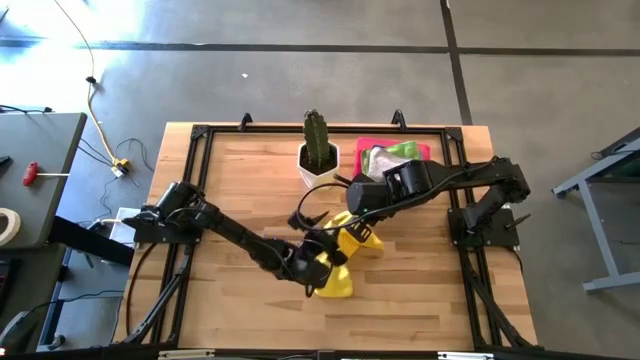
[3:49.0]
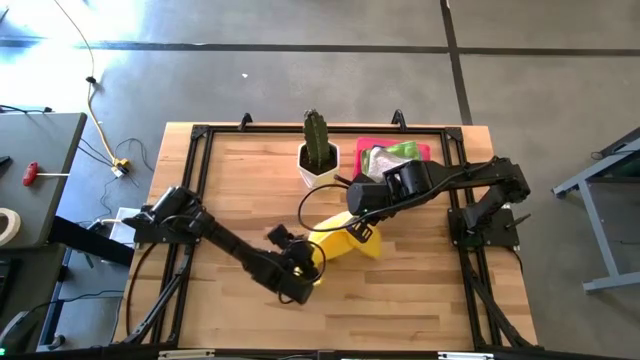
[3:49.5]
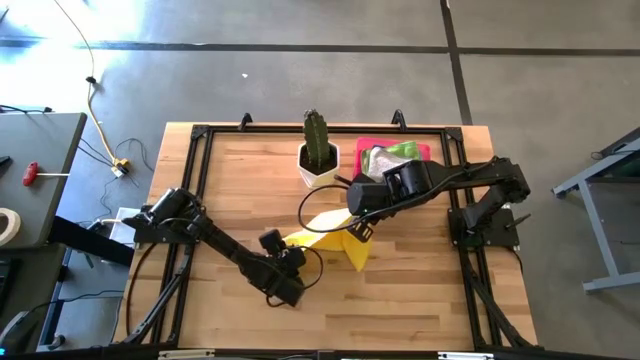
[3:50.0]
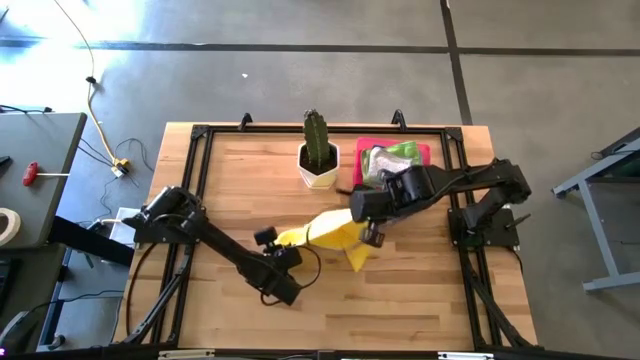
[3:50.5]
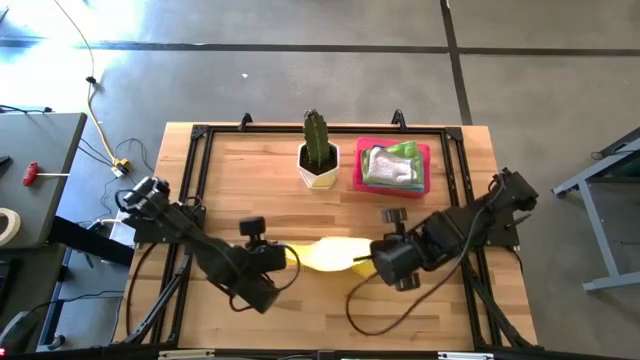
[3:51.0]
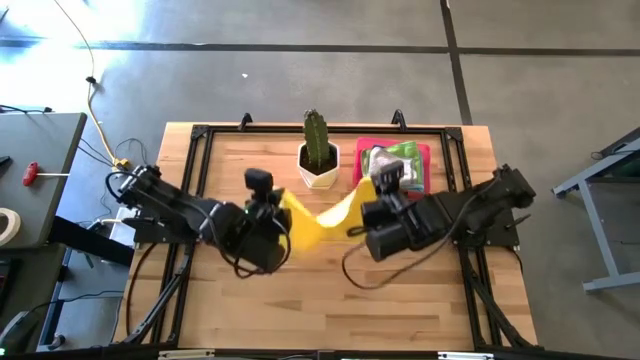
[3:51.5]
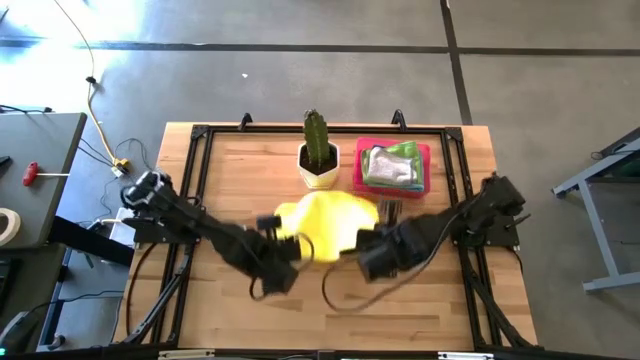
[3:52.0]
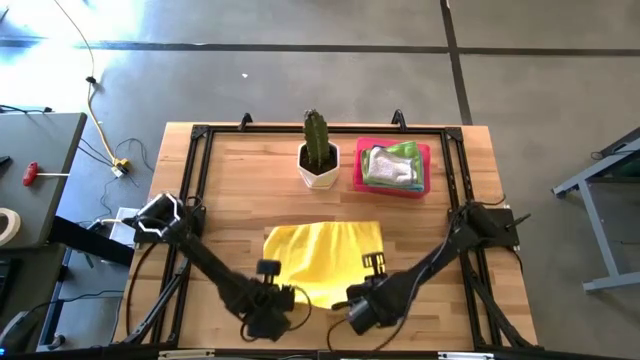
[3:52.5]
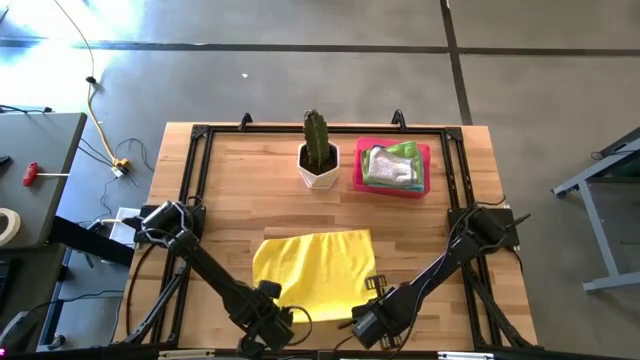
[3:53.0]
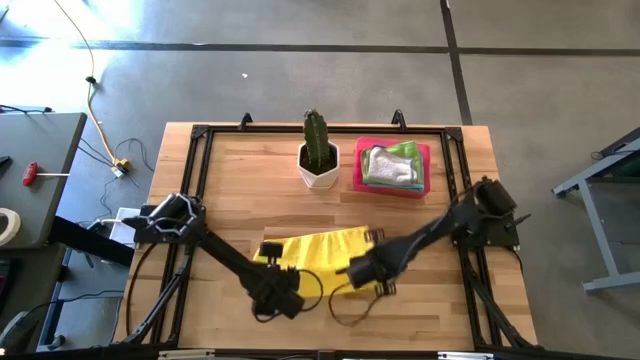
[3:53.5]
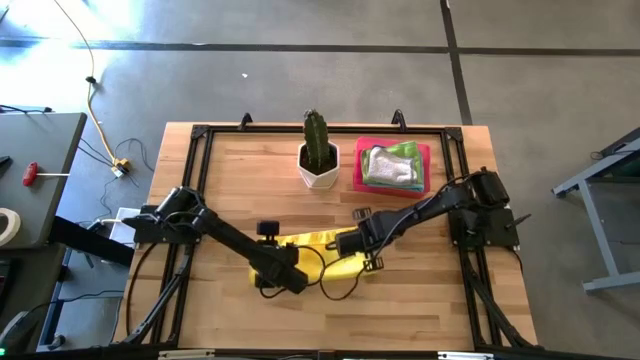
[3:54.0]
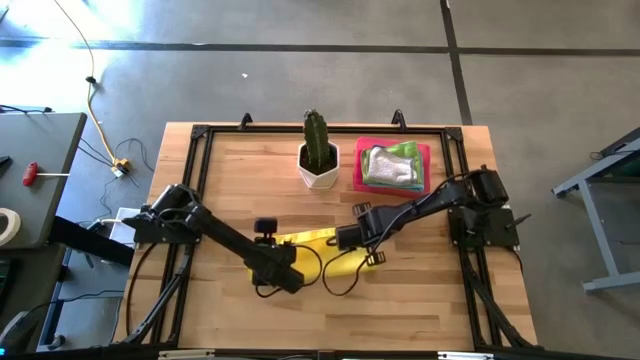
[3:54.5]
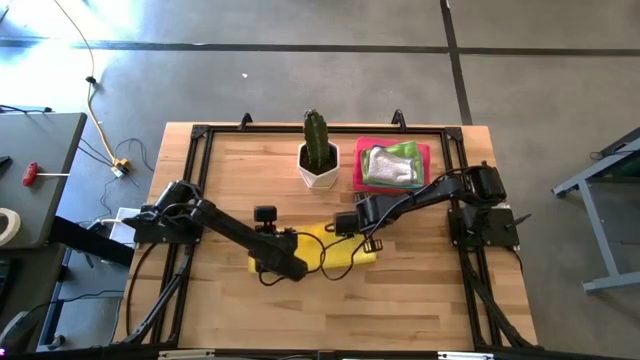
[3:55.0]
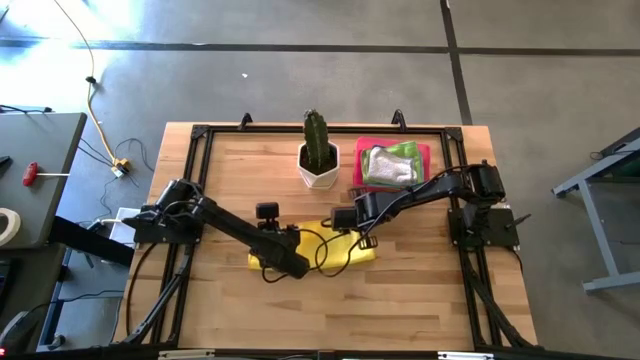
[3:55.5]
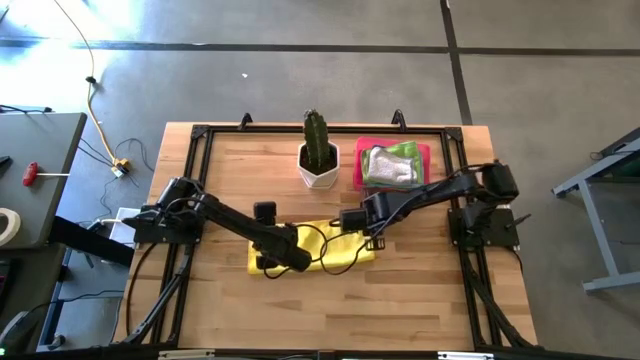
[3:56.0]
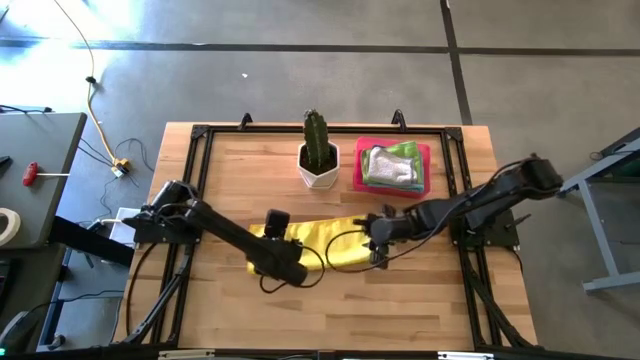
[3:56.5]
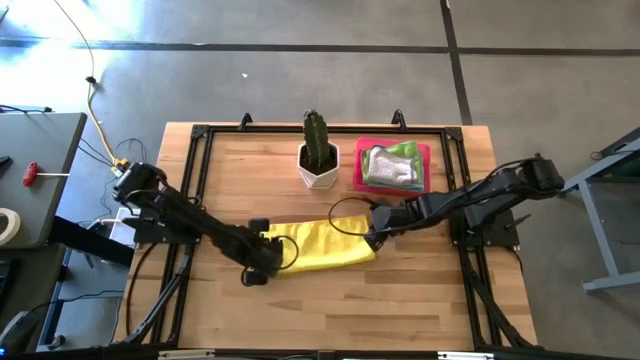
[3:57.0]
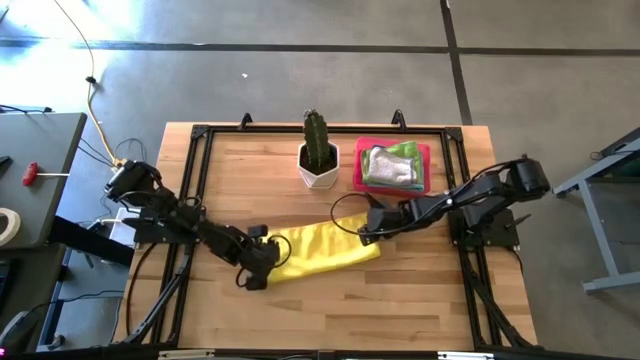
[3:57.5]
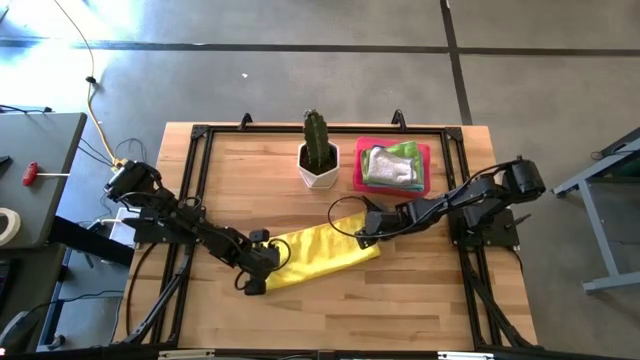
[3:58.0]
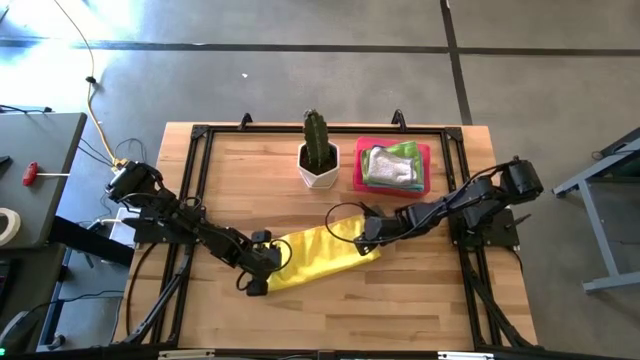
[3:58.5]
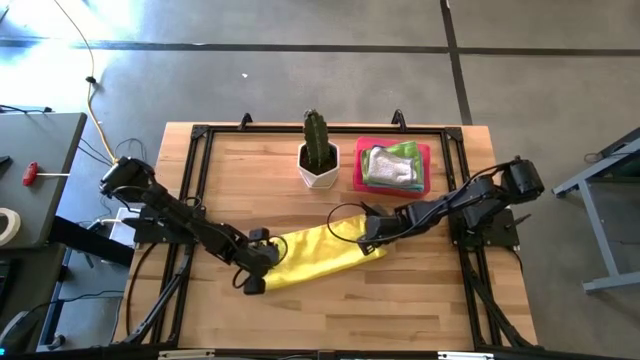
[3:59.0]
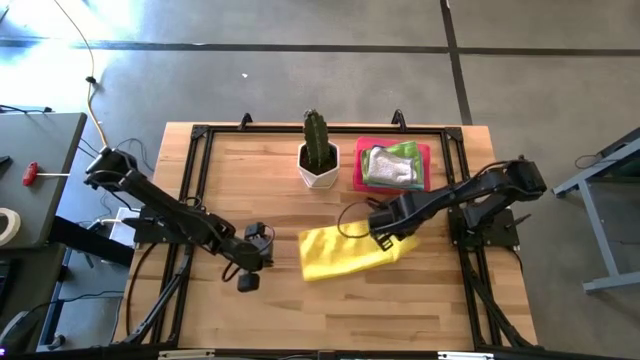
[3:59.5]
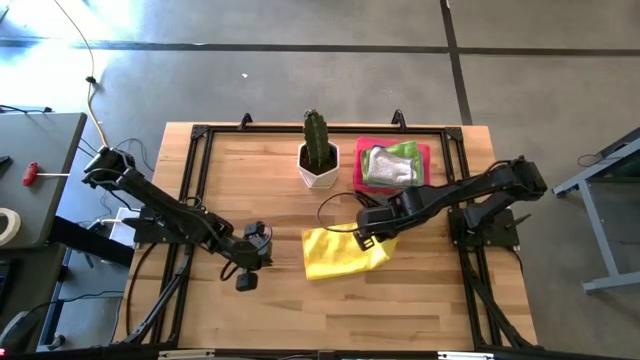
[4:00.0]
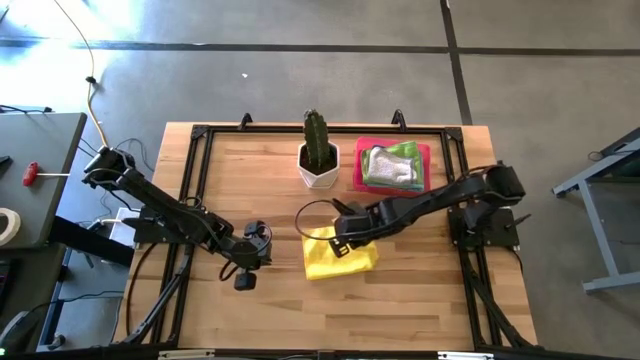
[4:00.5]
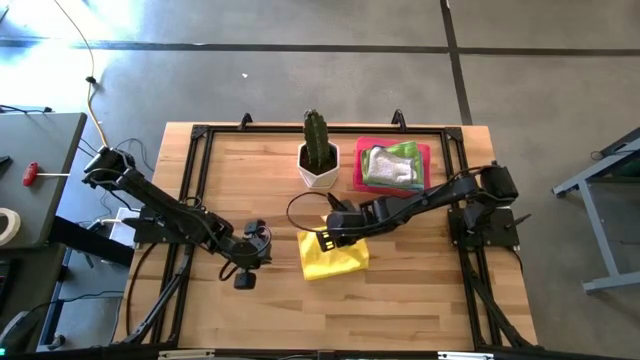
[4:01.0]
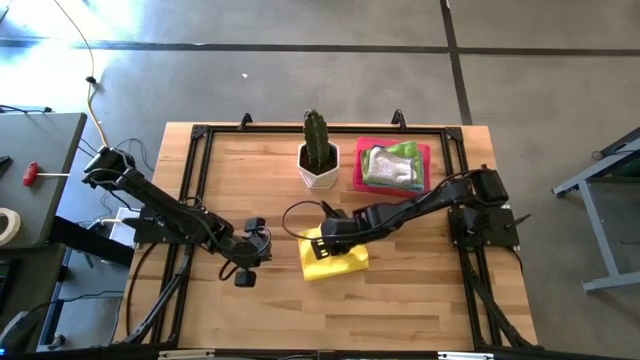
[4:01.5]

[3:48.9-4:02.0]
Task: Fold microfiber towels
Fold the yellow towel

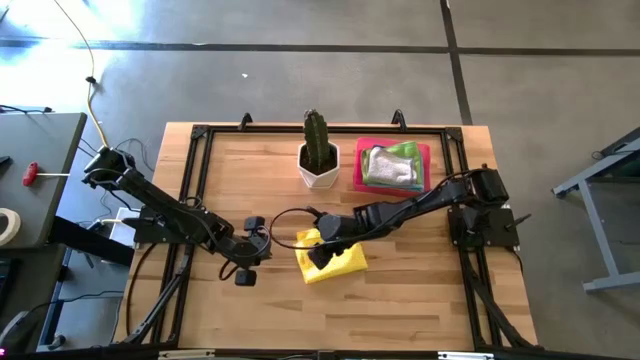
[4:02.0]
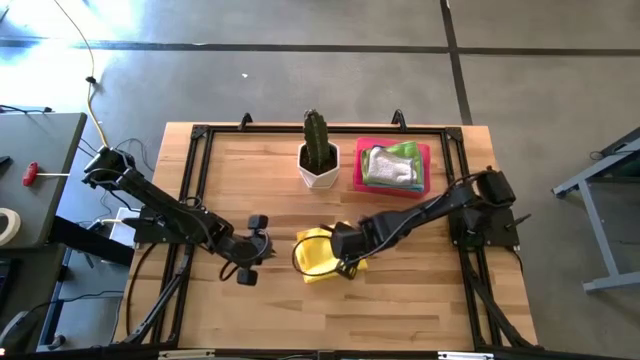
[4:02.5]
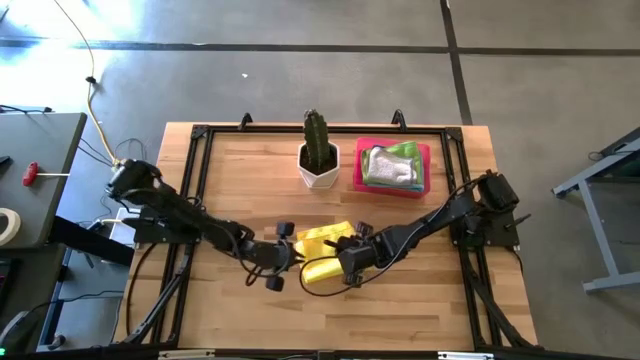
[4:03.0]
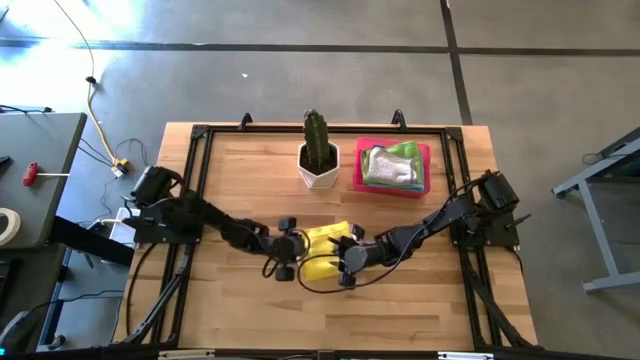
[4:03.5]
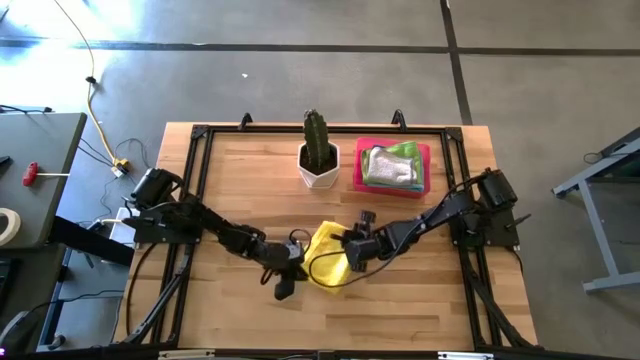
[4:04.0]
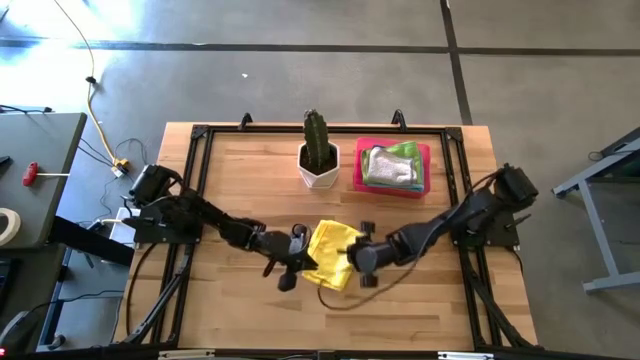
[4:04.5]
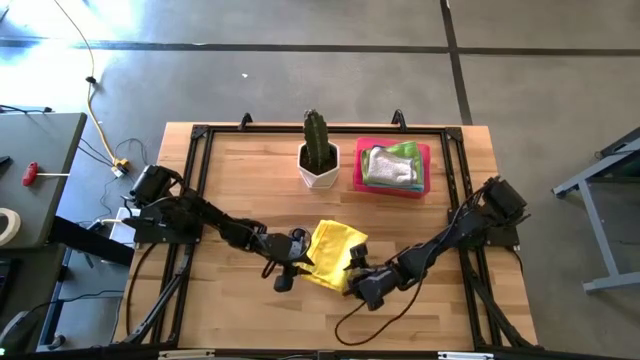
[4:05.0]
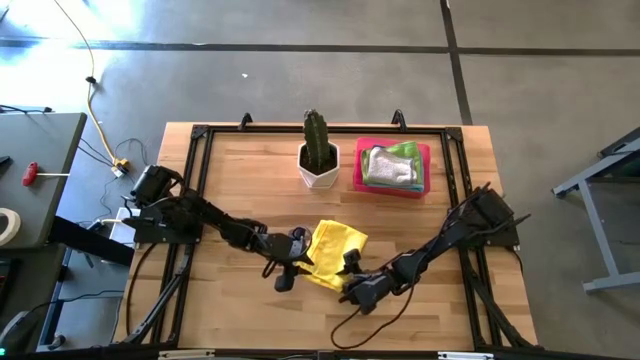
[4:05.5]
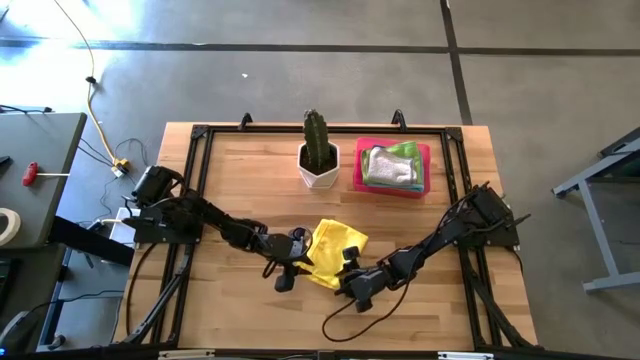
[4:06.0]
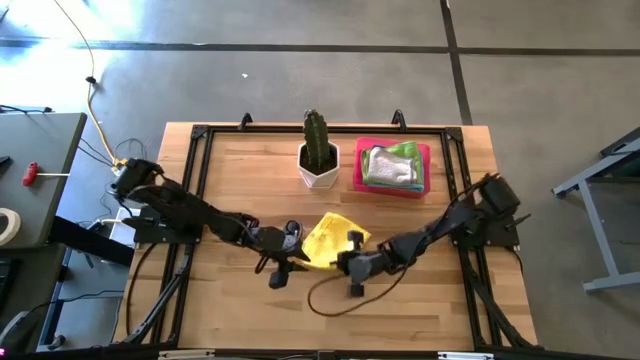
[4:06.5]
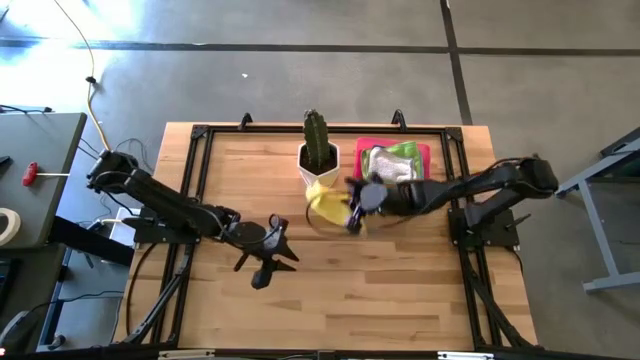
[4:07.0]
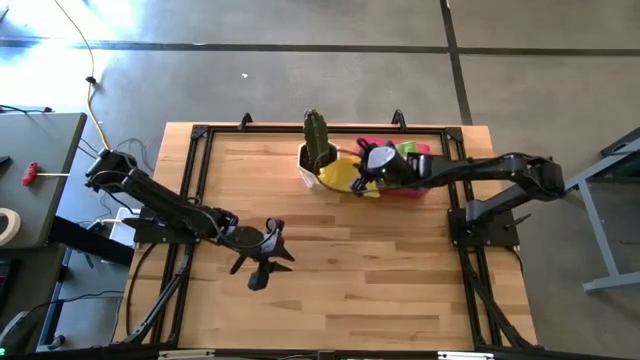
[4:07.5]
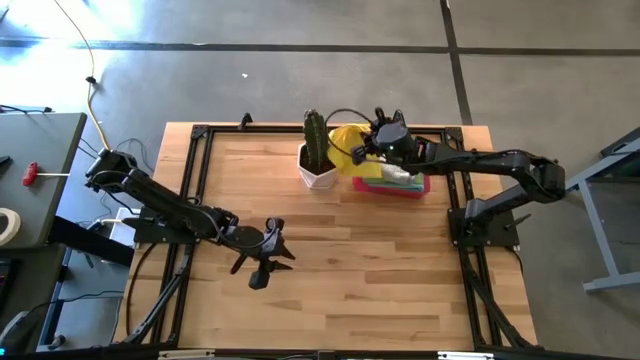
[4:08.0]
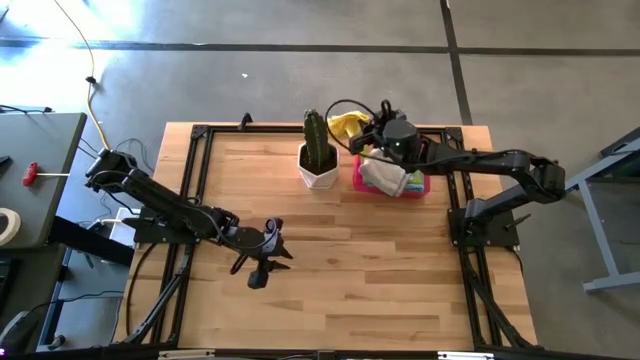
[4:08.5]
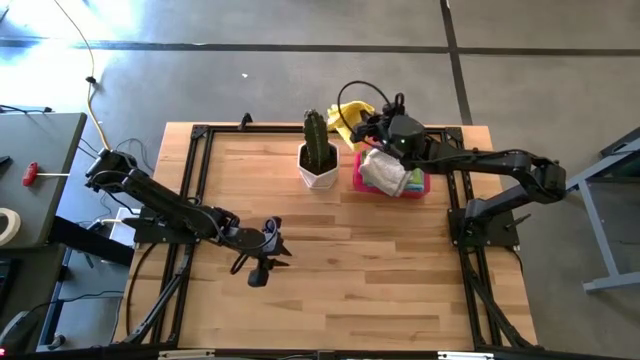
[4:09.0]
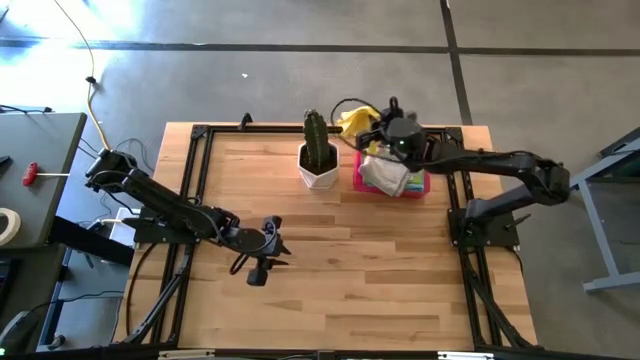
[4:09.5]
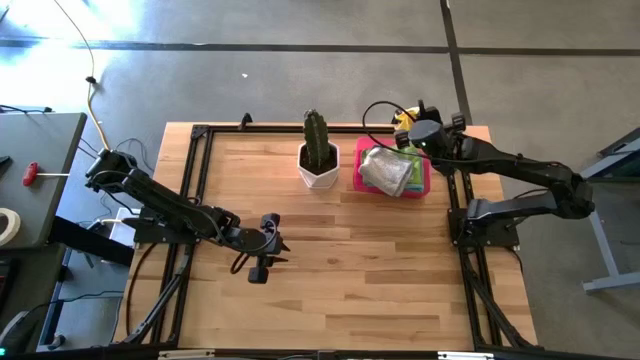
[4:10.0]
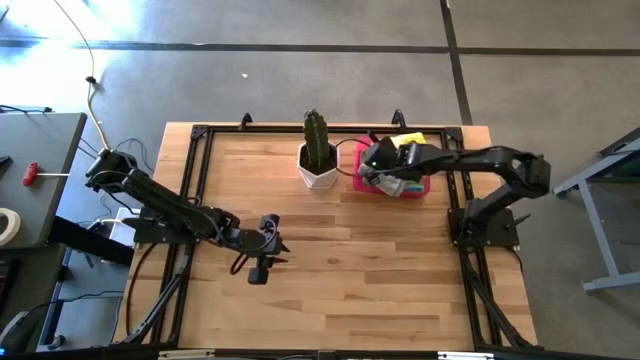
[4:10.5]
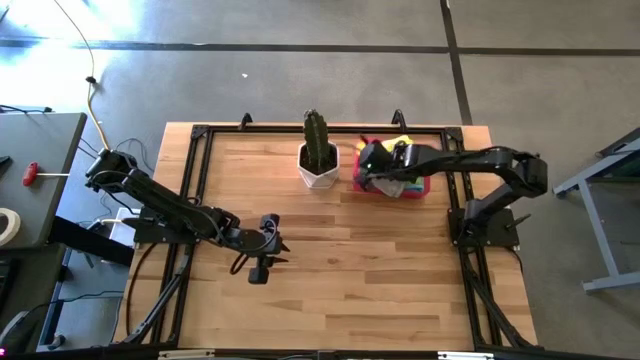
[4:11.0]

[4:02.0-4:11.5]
Put the yellow towel into the pink laundry bin
